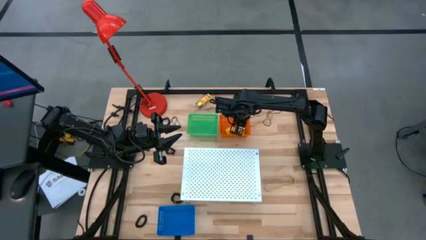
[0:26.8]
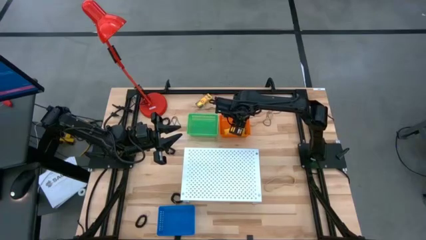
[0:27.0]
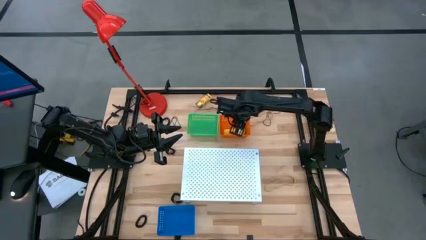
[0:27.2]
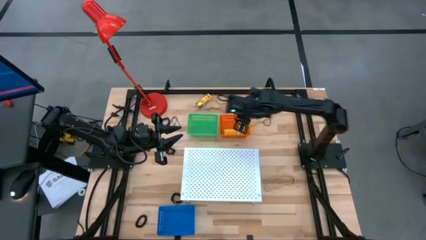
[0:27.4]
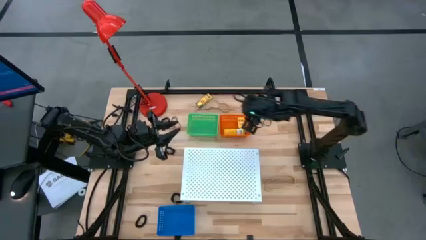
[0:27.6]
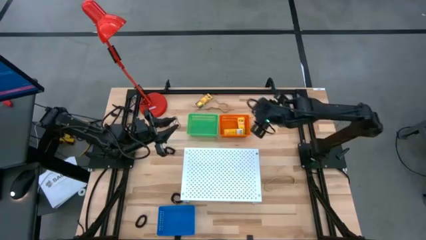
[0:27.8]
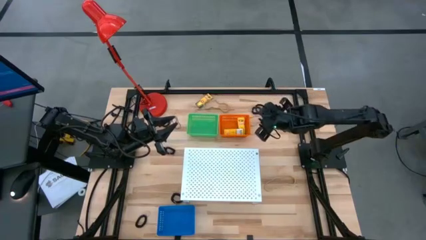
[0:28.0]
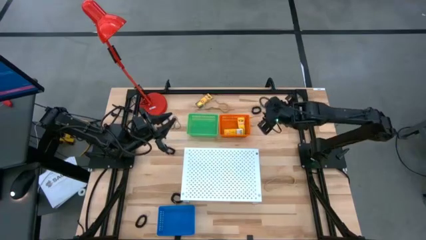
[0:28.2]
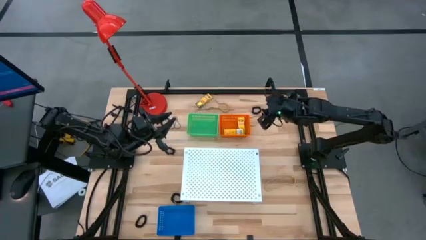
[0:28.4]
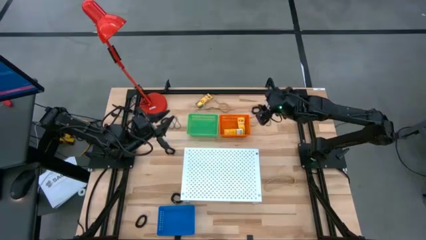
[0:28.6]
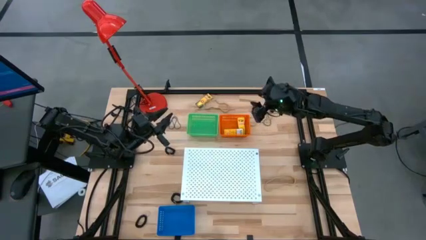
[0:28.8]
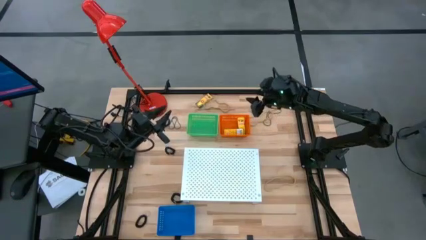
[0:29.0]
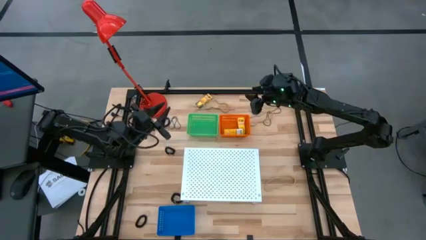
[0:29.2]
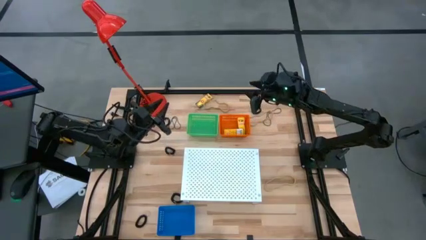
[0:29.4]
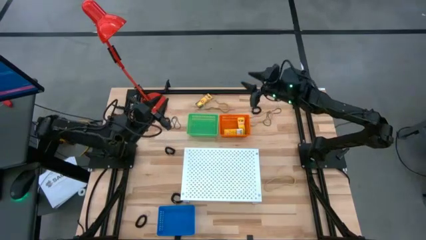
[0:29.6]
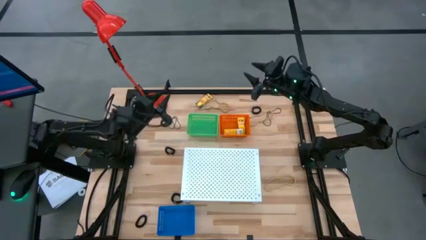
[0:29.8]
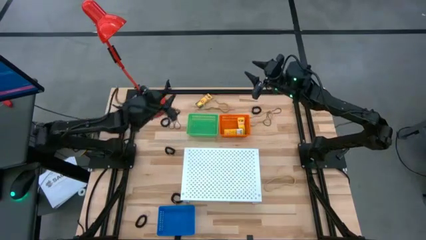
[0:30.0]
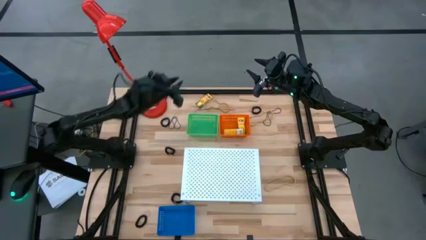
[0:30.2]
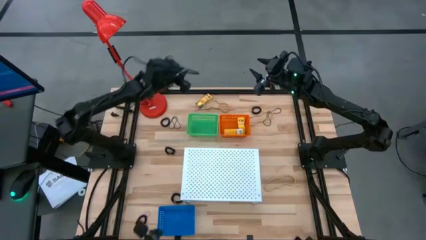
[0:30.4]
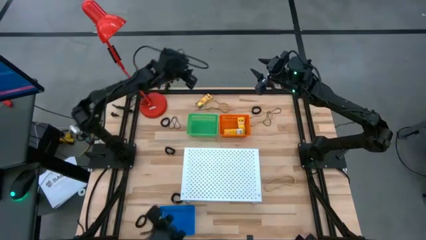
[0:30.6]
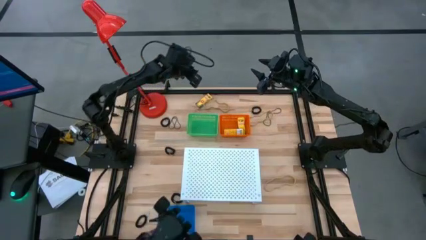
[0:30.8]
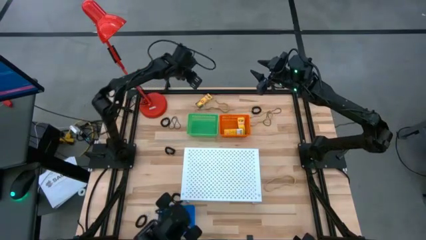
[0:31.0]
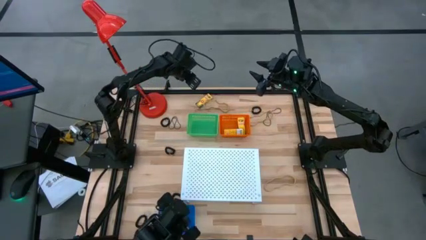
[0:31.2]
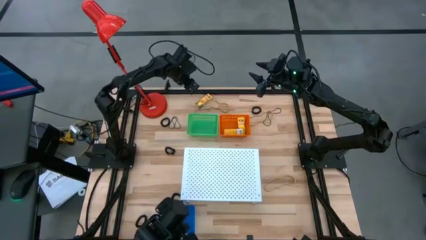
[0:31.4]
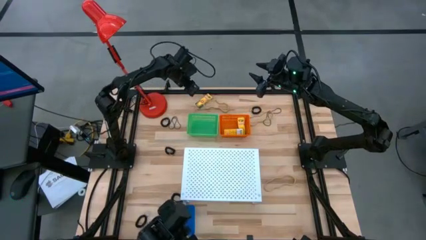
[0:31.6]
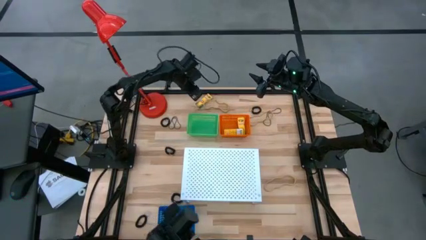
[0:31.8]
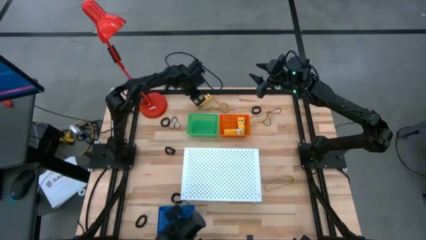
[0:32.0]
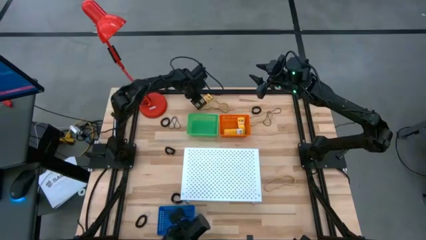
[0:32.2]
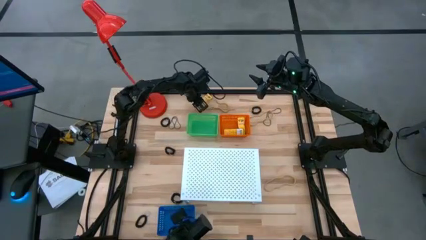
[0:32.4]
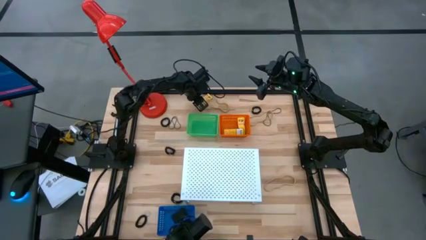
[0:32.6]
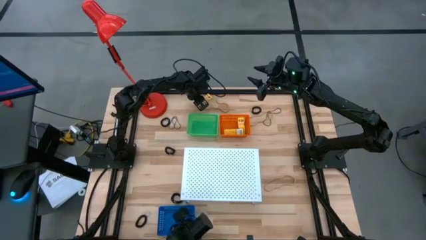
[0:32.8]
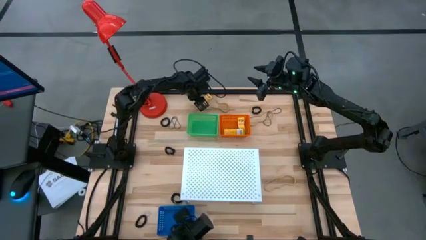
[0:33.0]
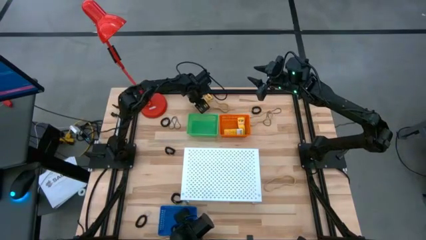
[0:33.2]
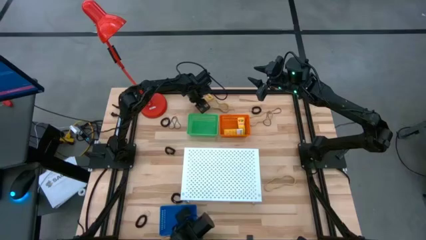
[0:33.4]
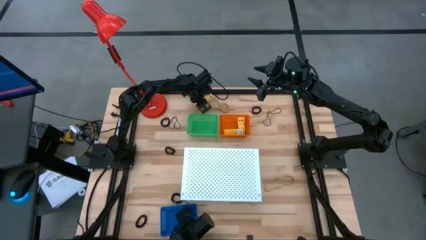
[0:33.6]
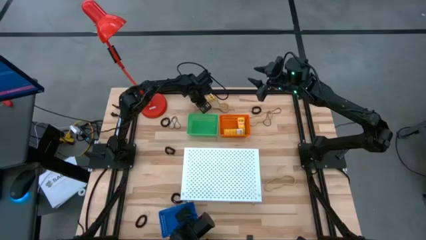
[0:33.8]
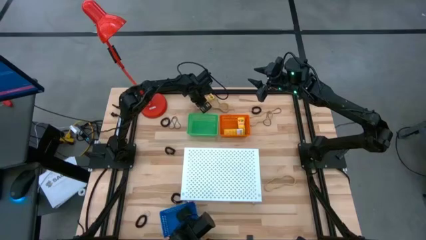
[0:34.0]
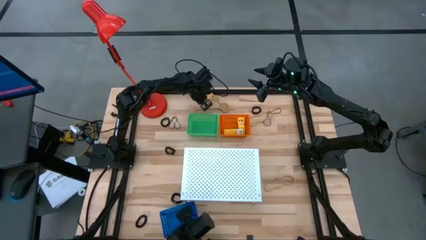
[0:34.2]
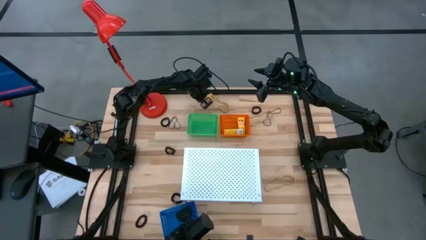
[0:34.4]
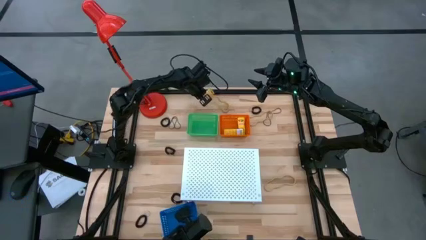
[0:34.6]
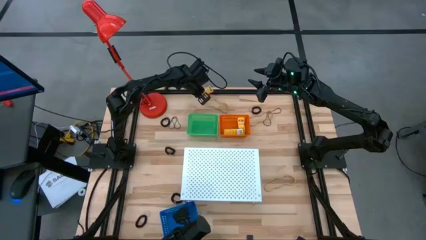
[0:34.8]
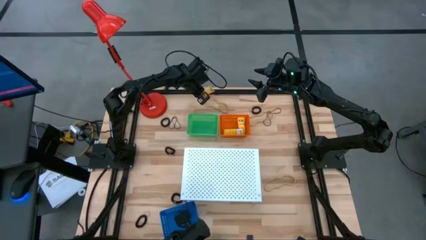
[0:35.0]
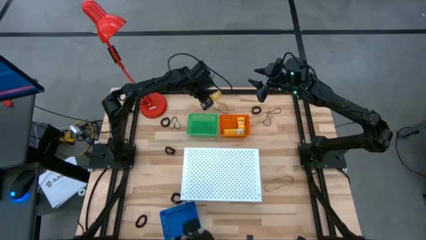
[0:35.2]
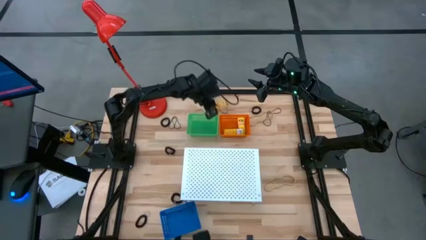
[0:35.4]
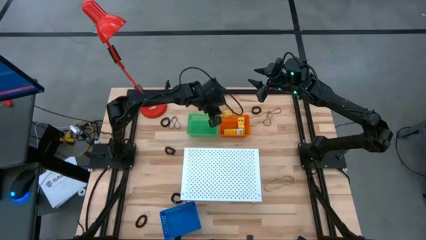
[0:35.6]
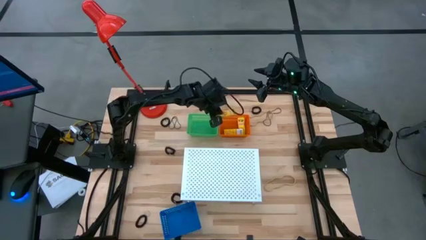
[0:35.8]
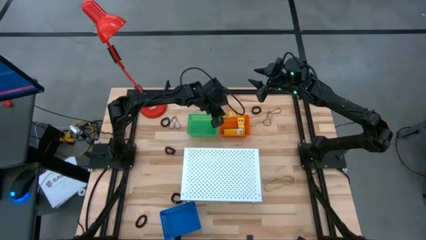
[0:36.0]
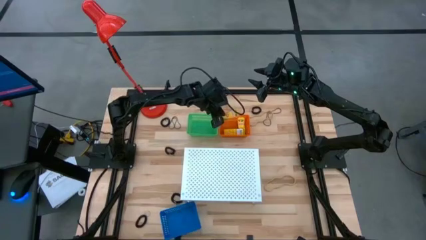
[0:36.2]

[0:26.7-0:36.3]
Task: Pick & Place Office Desk Supplies
Put the crayon box into the orange bin

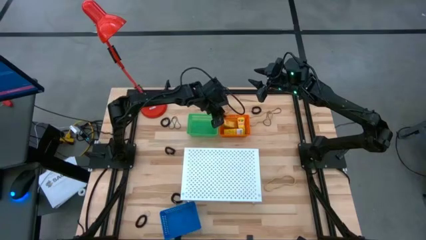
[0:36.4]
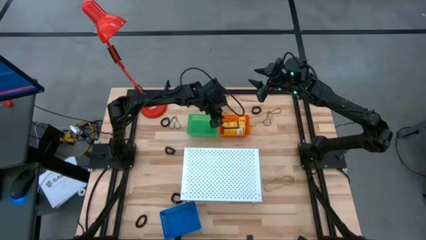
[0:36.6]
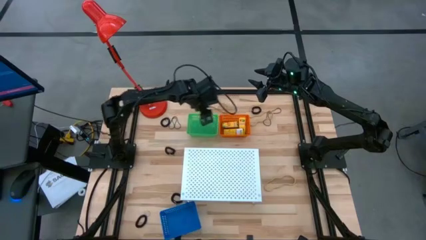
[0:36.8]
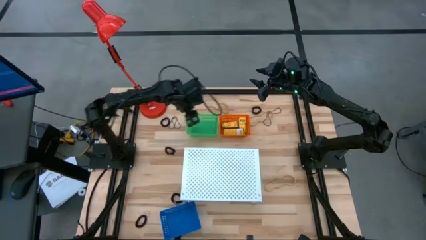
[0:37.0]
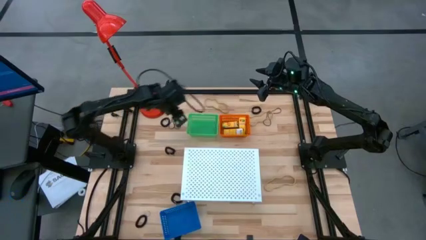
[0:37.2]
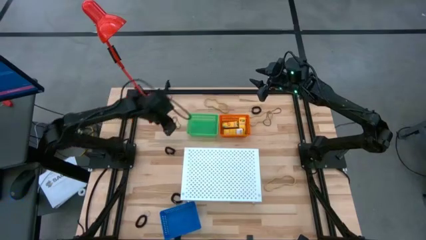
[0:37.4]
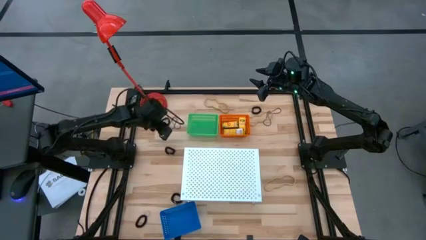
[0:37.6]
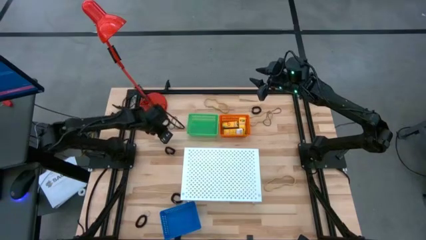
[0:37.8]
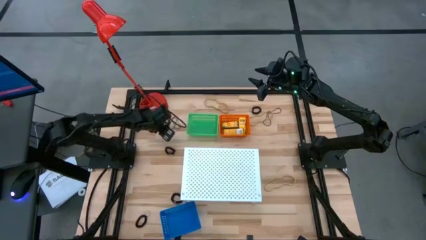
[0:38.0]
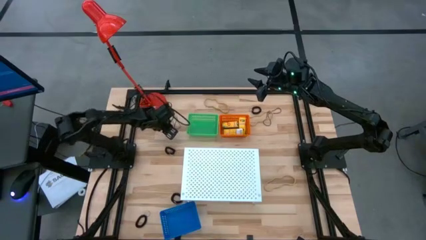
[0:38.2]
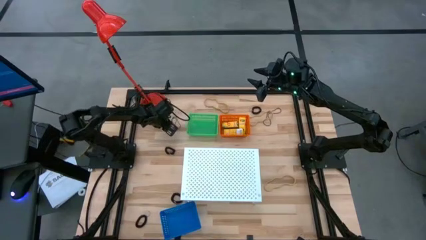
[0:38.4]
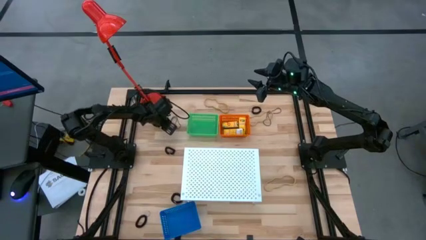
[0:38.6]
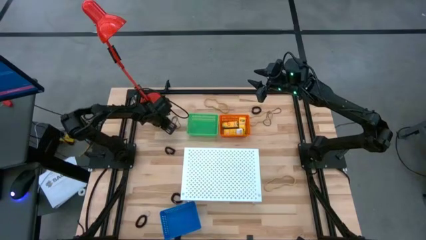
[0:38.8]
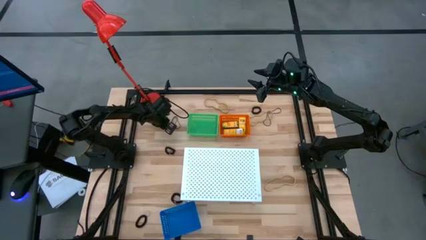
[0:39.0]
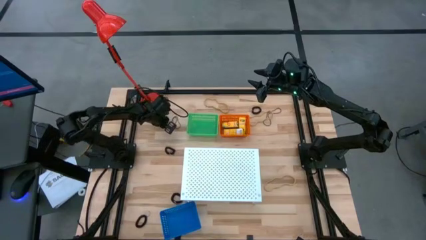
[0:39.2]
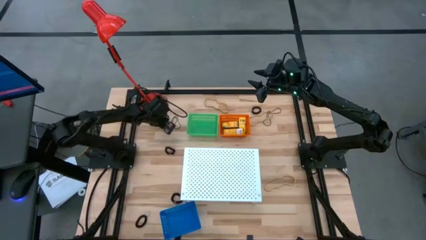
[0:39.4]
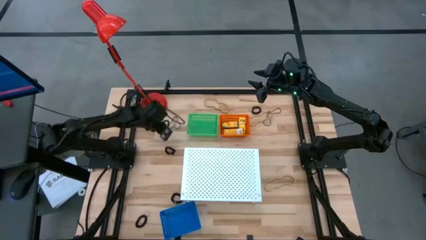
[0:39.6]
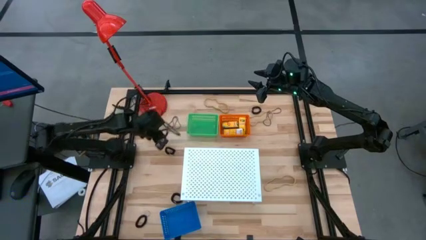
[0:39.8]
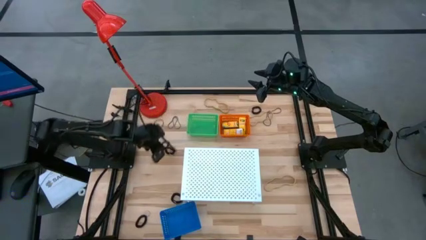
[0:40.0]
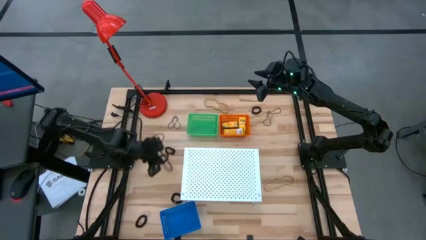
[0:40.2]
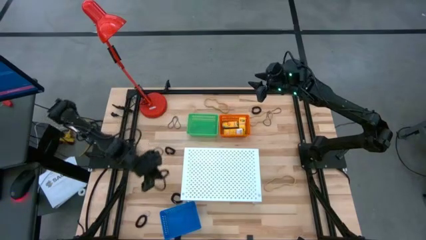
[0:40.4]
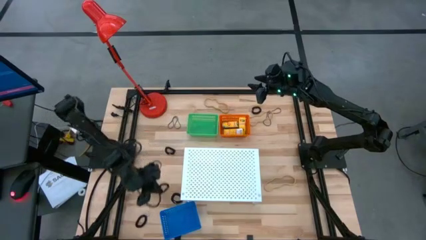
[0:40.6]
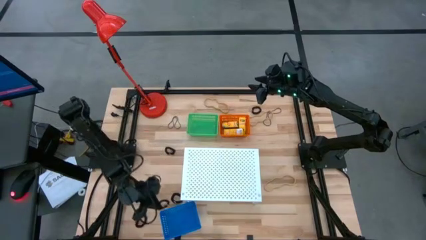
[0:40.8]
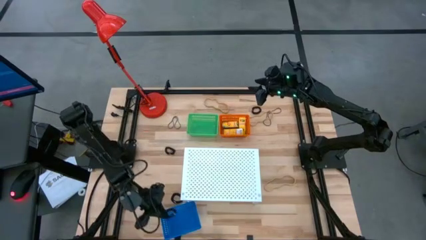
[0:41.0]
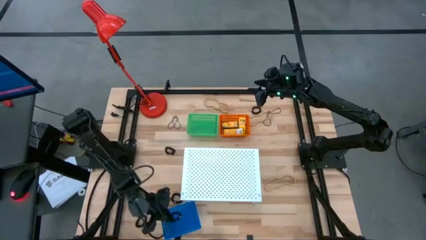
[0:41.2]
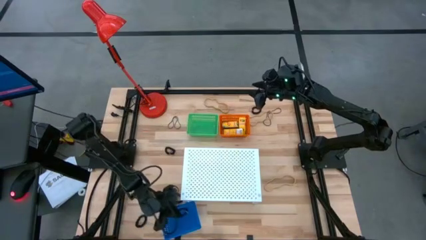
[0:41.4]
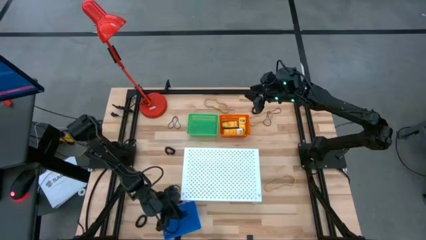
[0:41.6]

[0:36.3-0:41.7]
Put the black spring keychain into the blue bin
